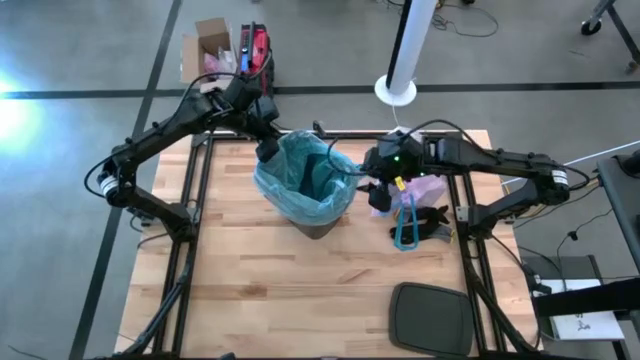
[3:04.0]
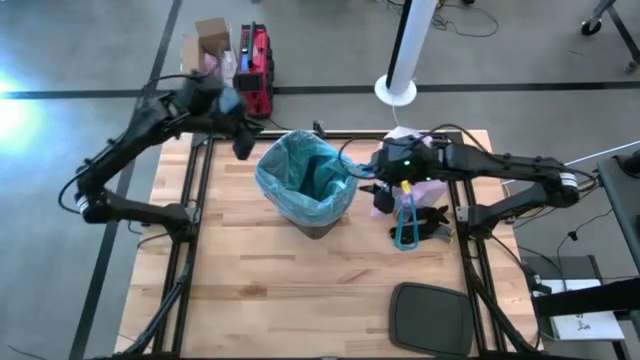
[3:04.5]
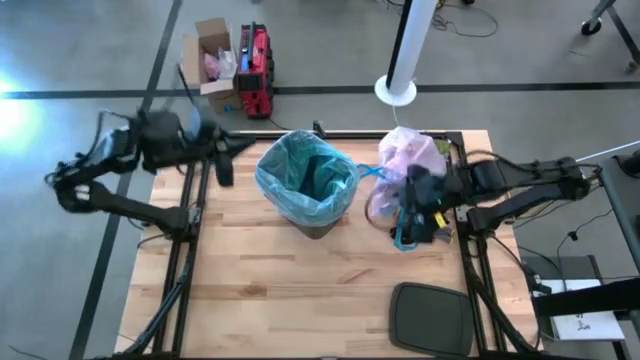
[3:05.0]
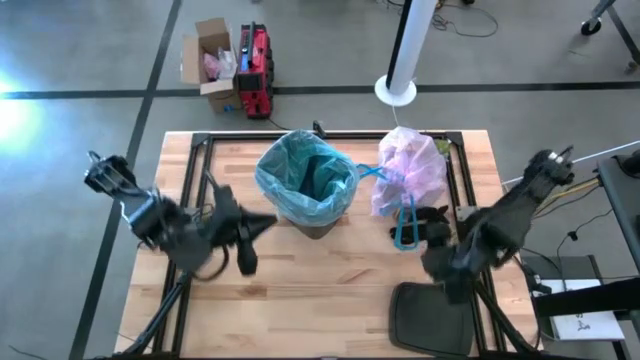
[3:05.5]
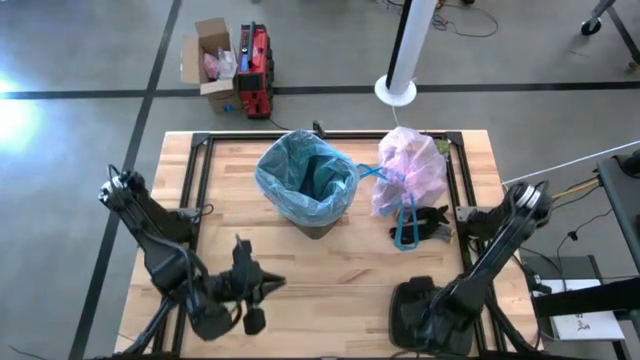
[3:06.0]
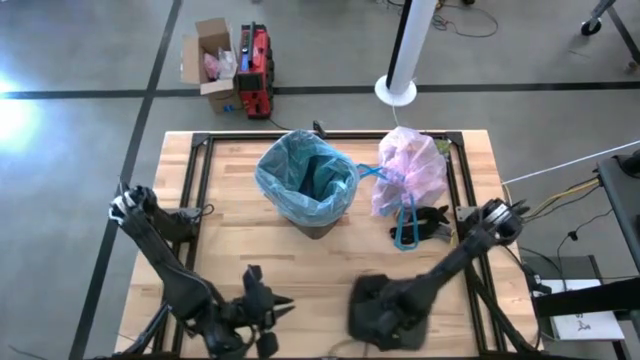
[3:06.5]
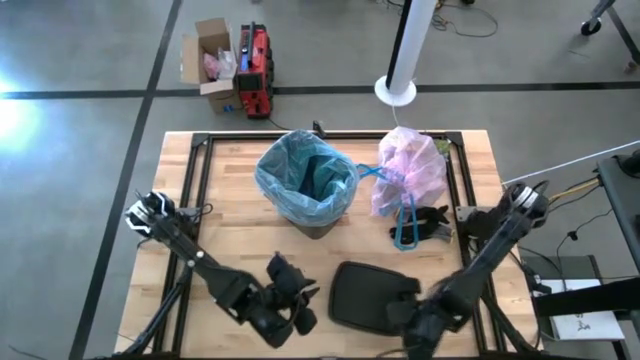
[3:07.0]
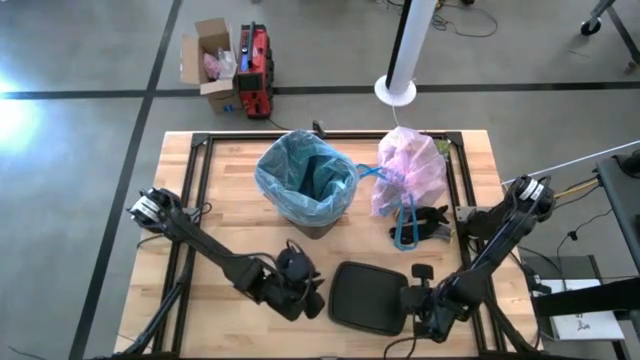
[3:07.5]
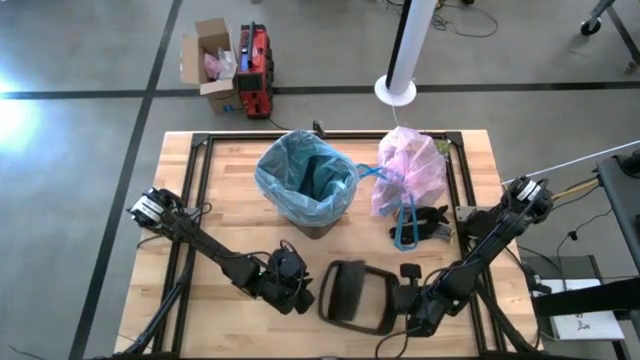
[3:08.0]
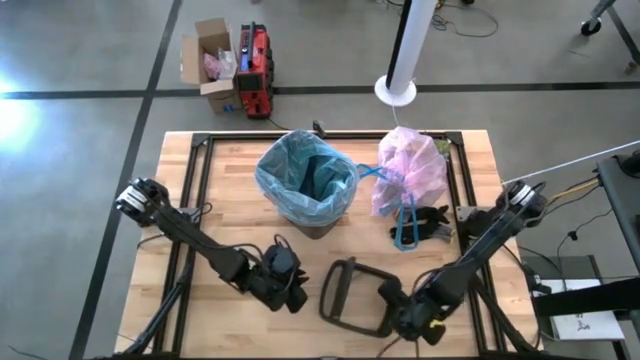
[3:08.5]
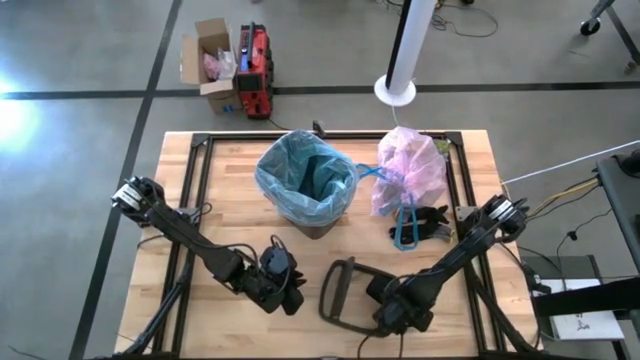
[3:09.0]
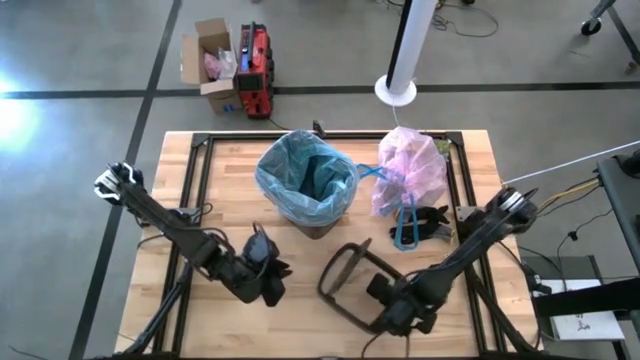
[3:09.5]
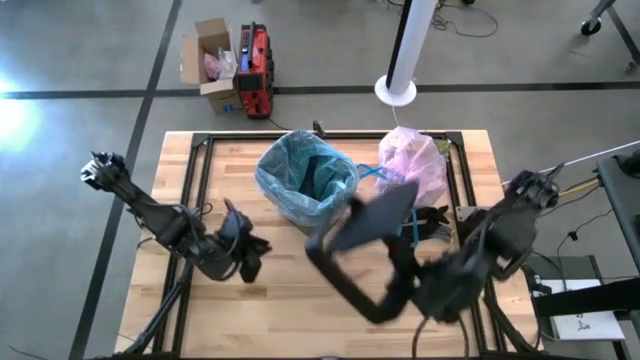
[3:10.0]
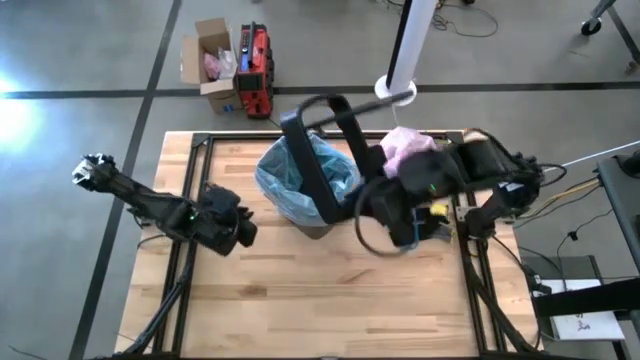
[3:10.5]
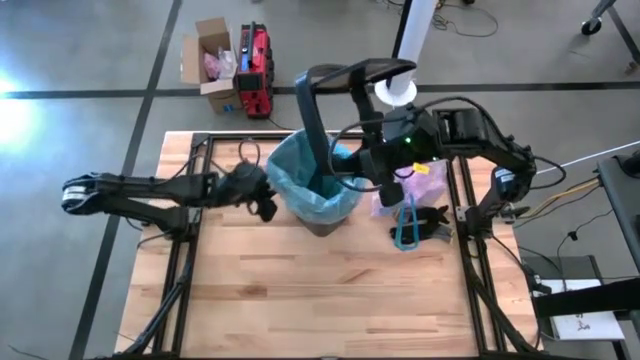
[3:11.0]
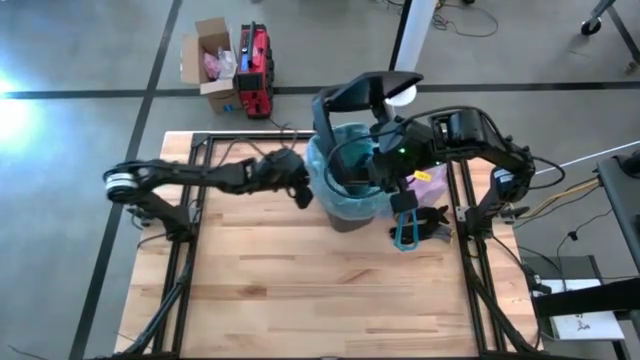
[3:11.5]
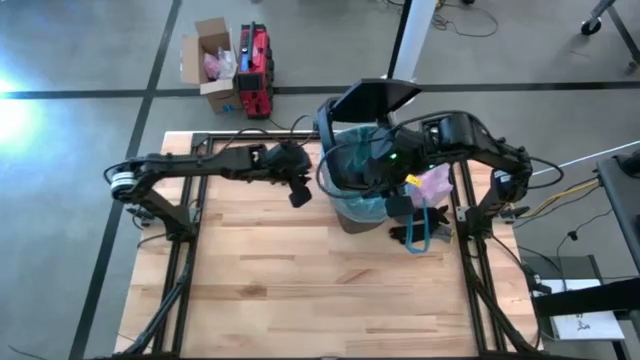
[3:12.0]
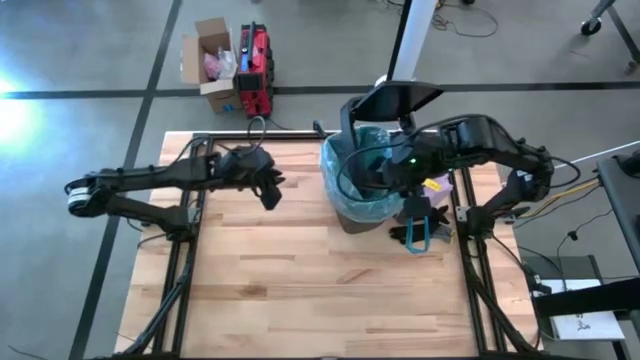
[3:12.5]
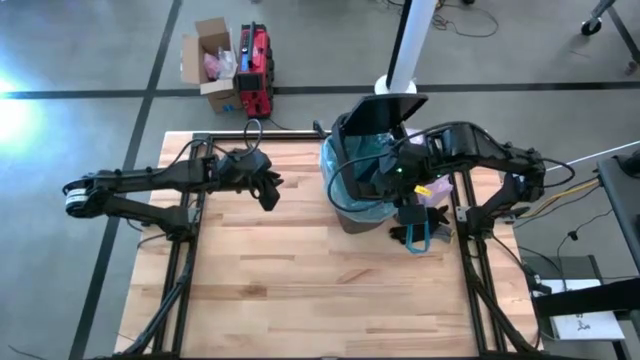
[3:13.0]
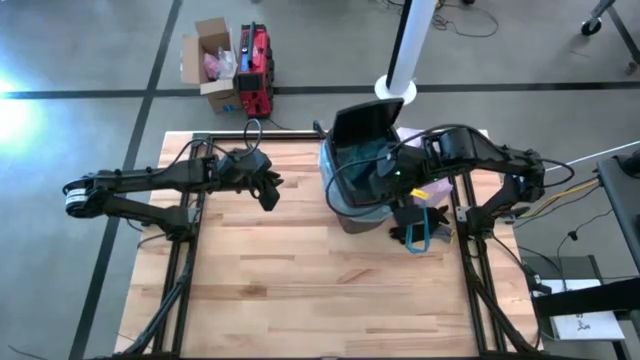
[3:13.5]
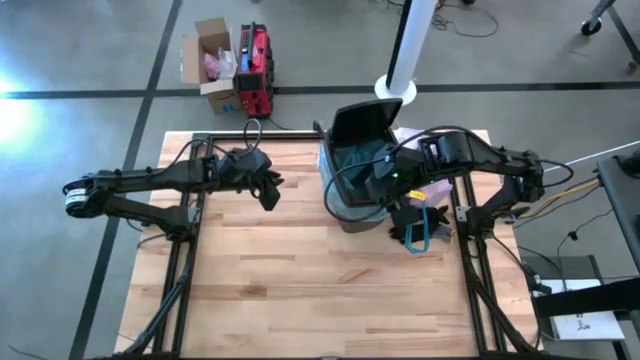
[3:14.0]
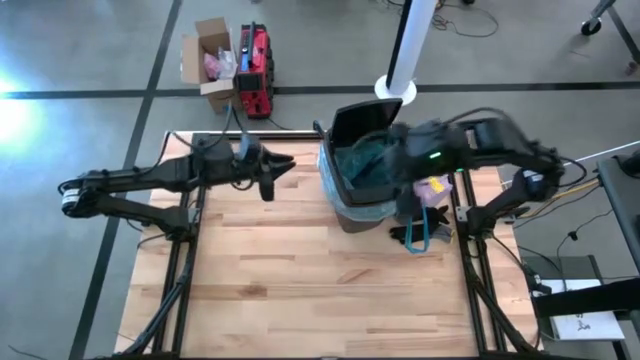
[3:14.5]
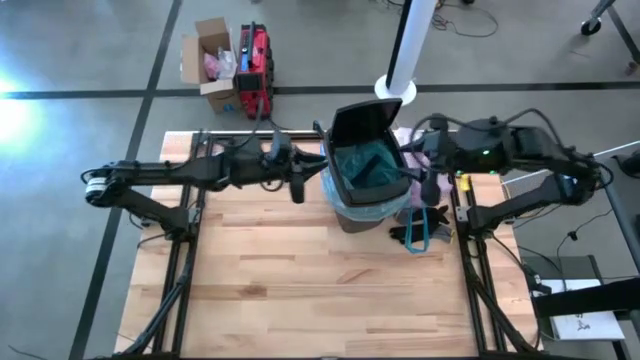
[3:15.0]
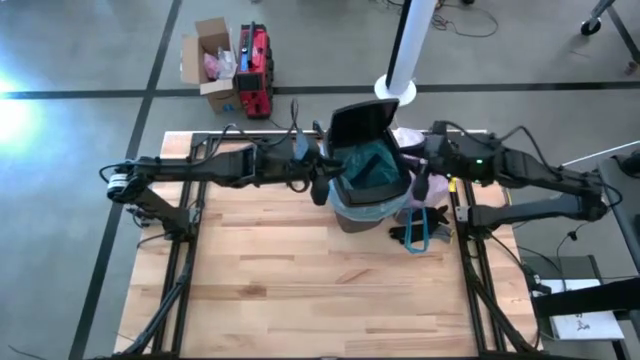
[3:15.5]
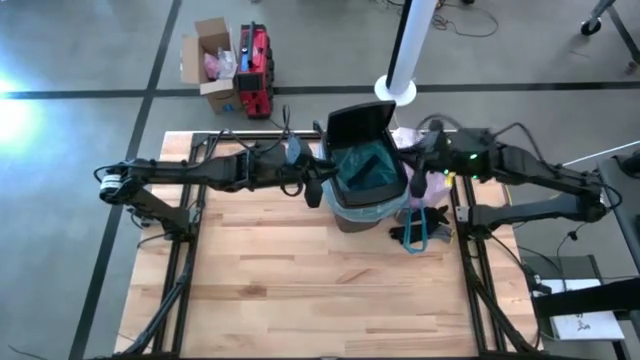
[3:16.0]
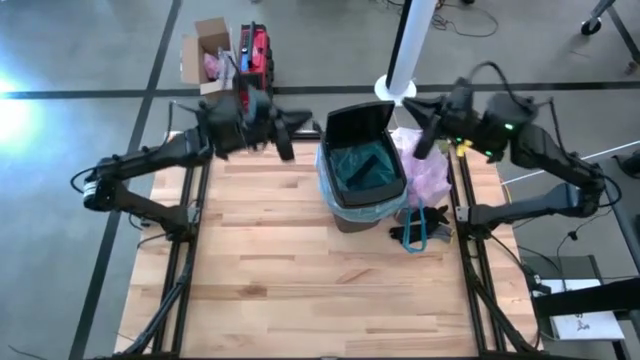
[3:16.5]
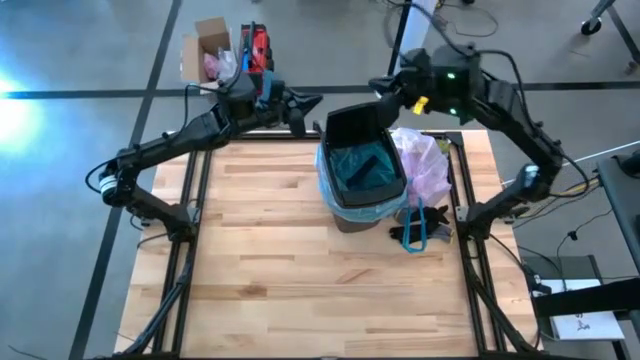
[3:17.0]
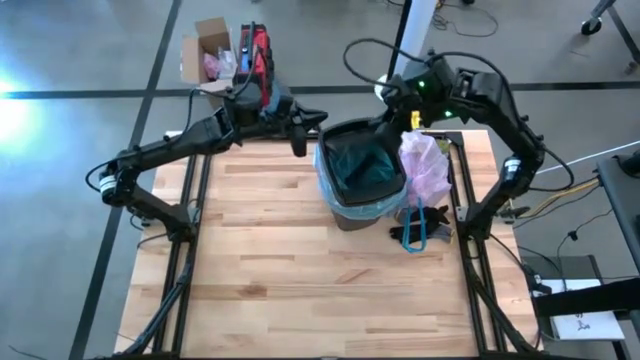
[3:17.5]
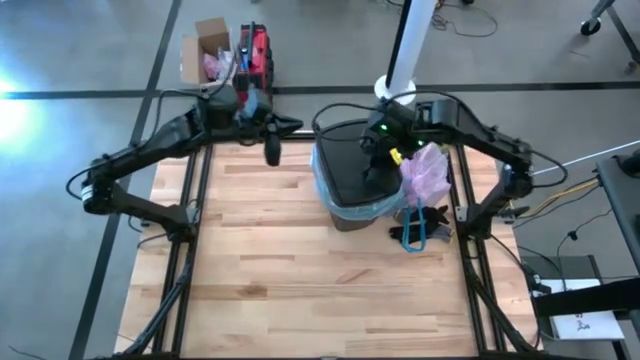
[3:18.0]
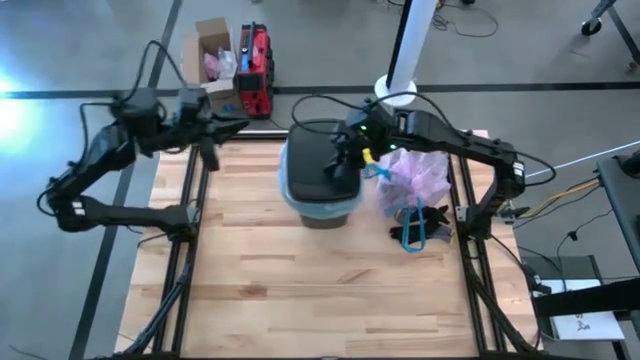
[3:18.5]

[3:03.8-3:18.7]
Task: place trash/remove bag and relplace
Close the trash bin with the trash bin cover

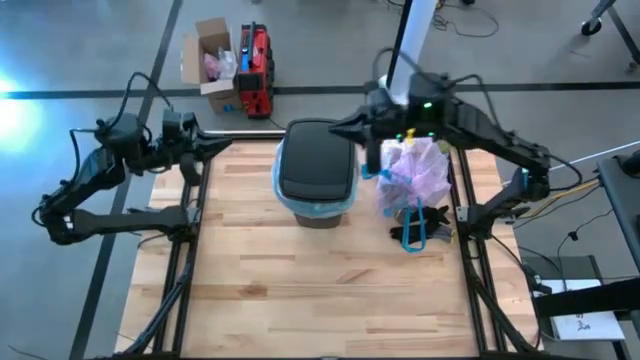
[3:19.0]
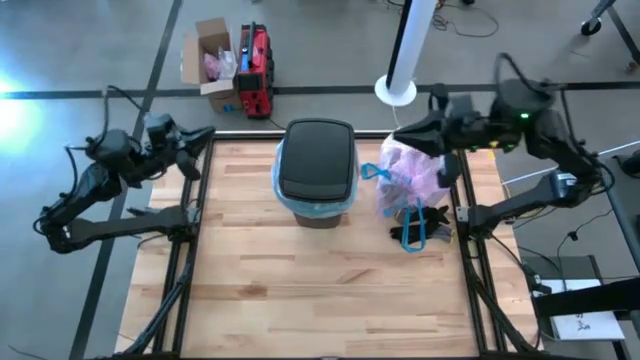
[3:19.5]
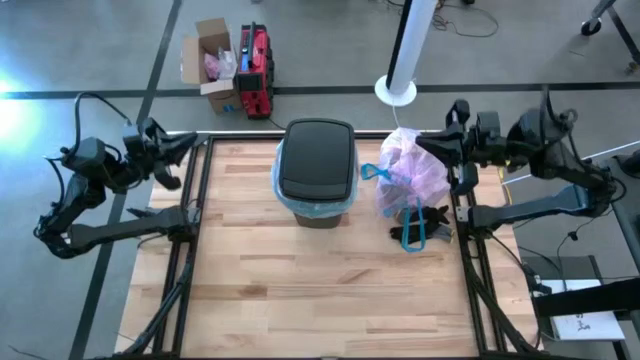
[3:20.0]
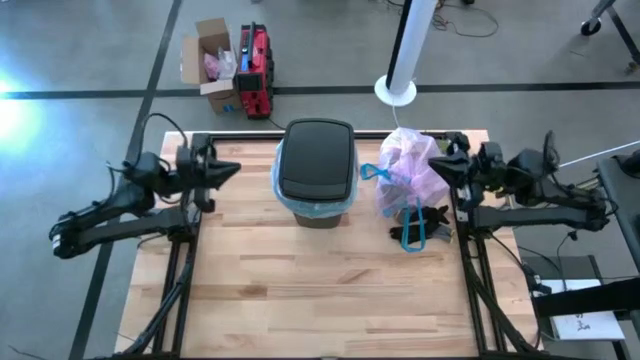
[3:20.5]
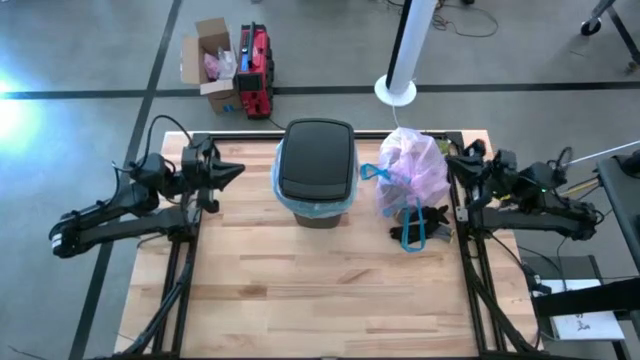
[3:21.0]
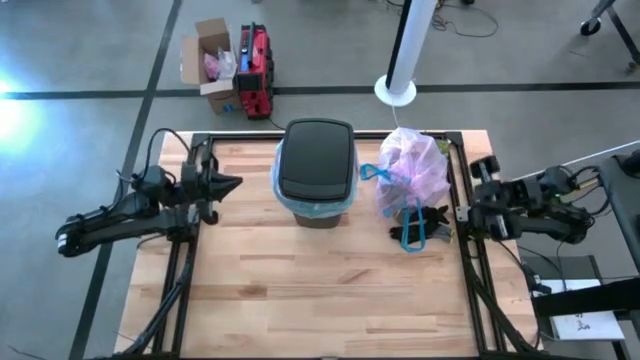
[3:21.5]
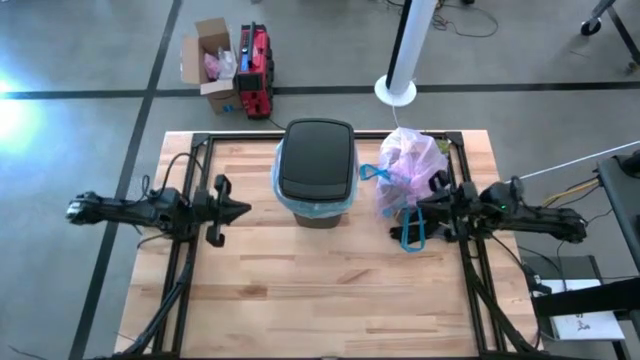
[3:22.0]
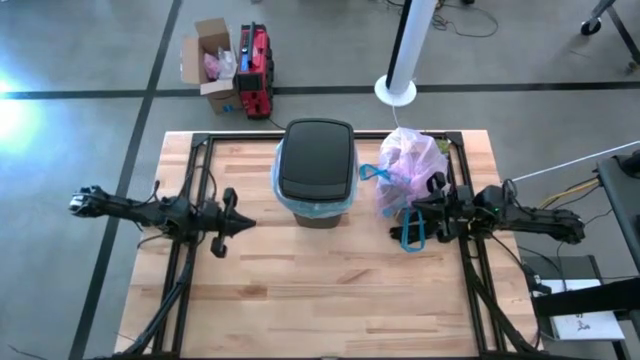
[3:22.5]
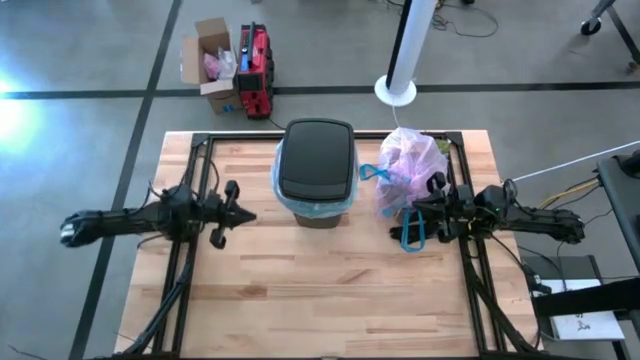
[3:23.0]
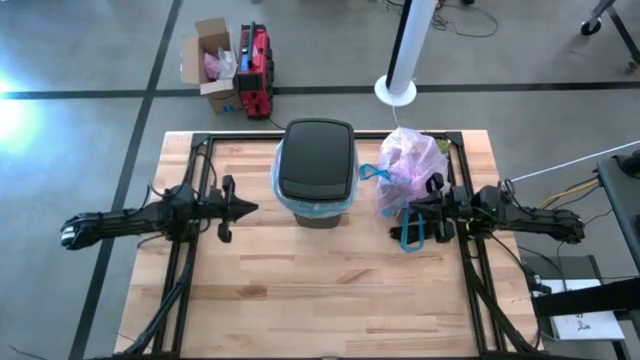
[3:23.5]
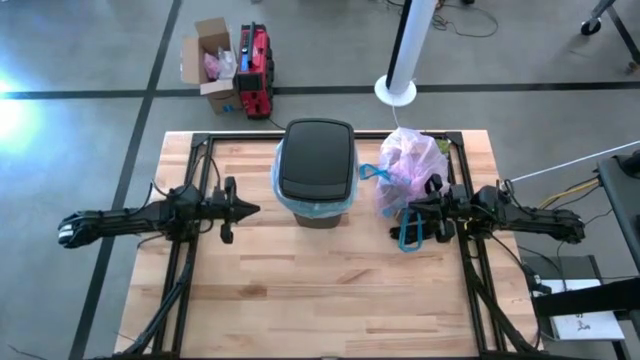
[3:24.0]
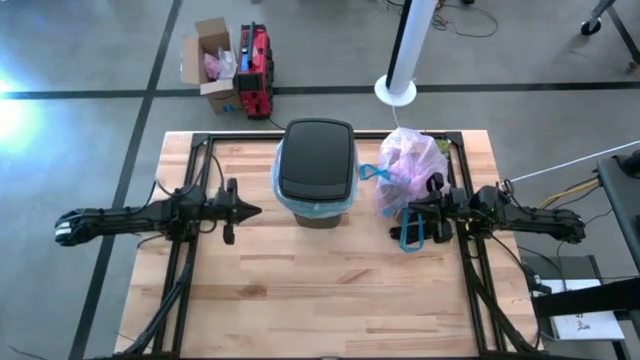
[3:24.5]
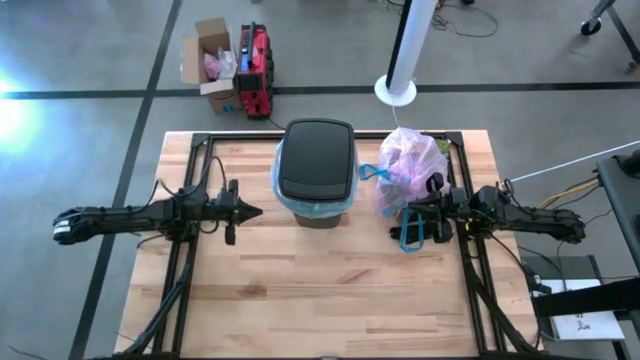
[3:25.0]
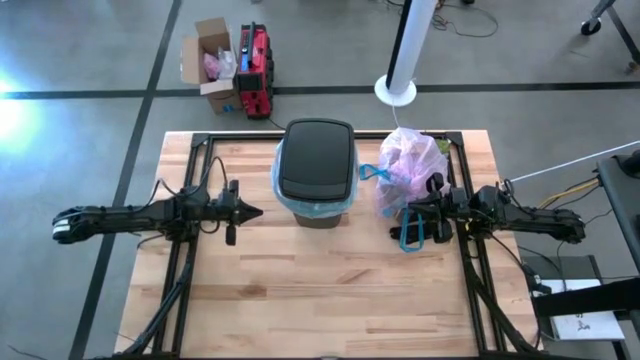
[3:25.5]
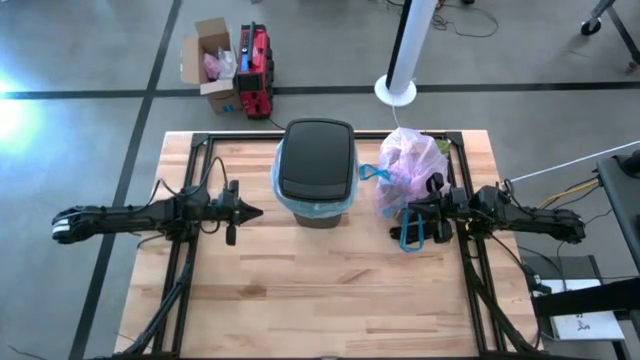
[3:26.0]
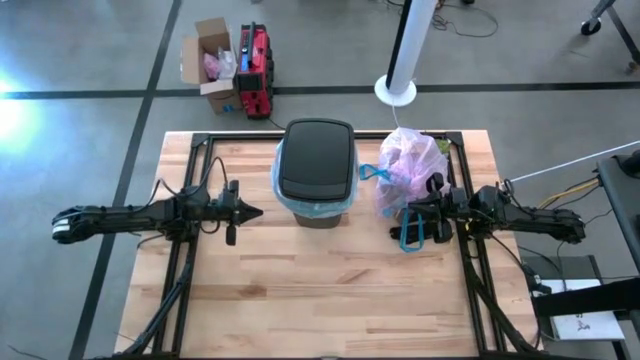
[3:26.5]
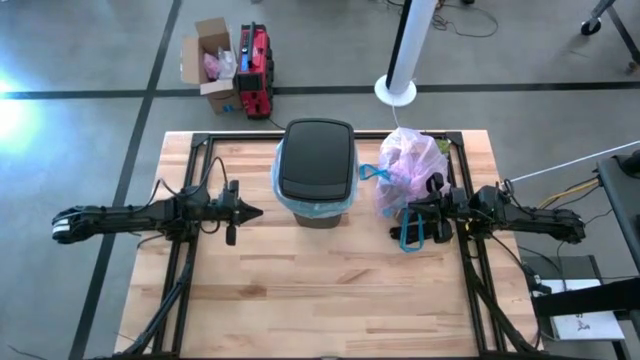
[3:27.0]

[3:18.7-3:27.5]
Return to Home Position
